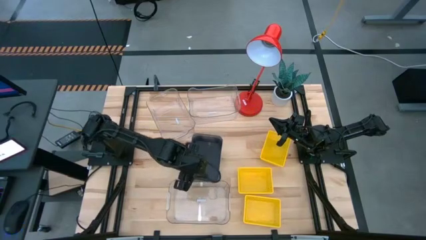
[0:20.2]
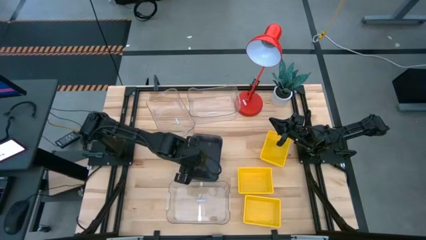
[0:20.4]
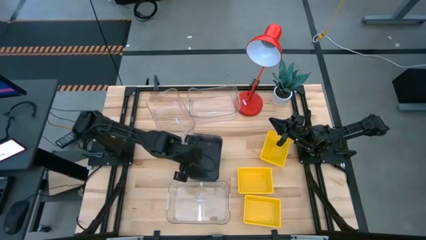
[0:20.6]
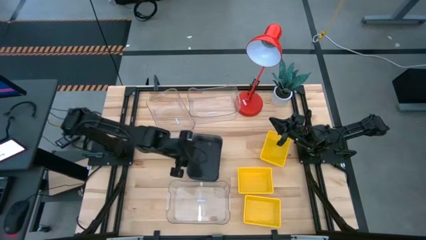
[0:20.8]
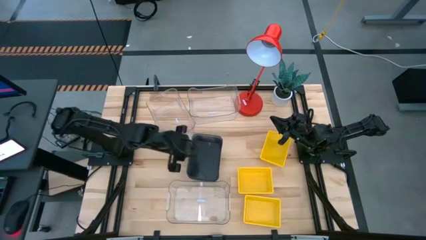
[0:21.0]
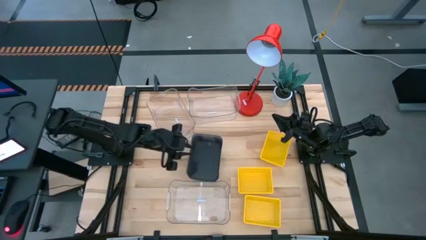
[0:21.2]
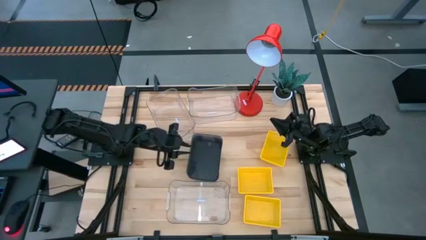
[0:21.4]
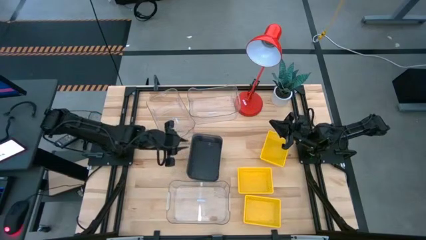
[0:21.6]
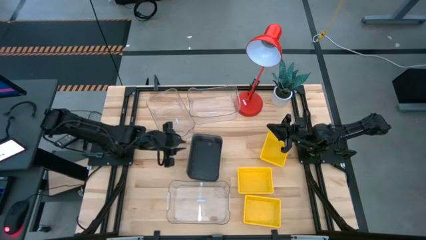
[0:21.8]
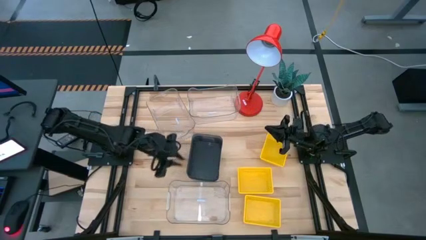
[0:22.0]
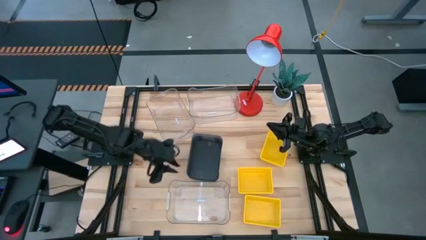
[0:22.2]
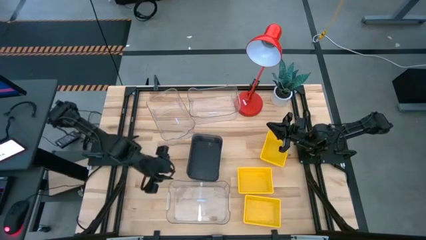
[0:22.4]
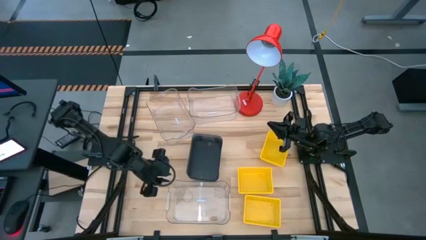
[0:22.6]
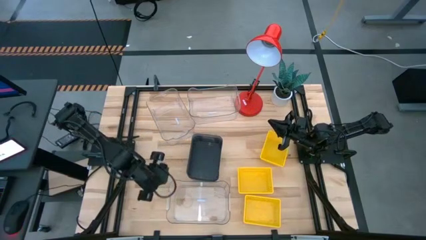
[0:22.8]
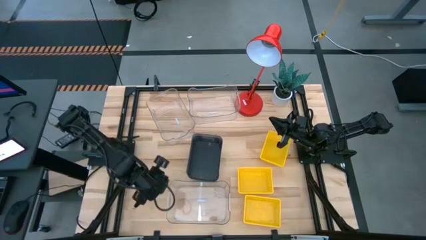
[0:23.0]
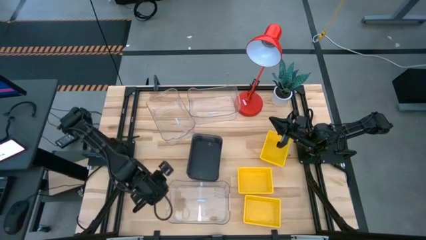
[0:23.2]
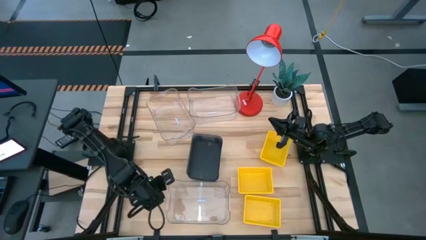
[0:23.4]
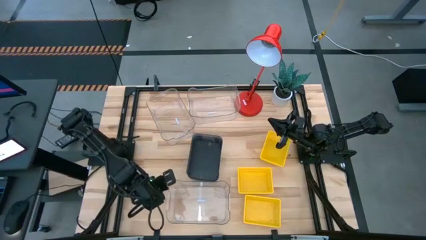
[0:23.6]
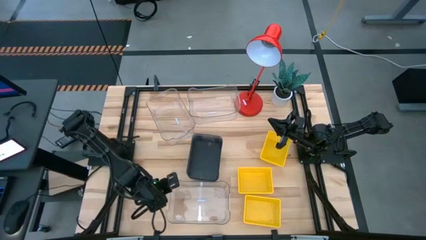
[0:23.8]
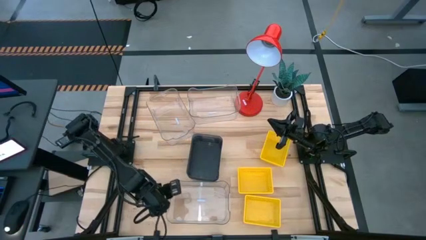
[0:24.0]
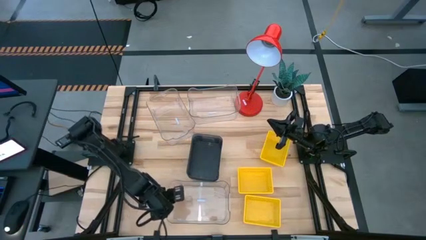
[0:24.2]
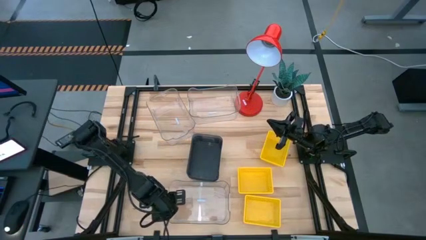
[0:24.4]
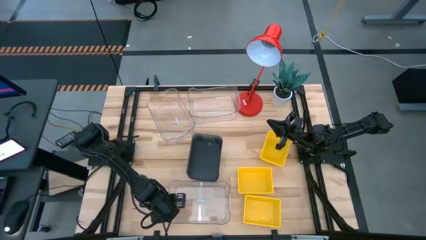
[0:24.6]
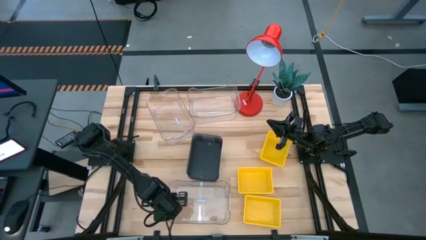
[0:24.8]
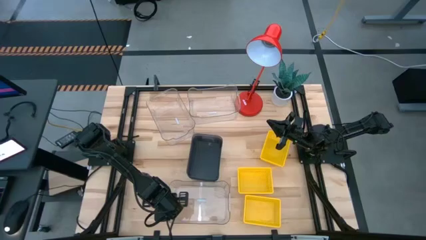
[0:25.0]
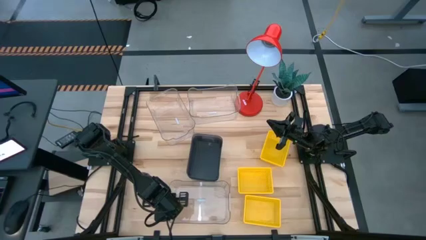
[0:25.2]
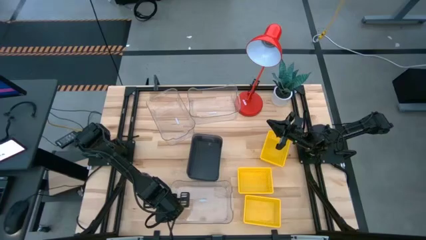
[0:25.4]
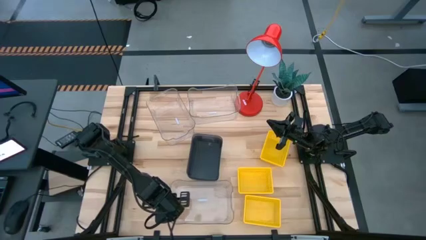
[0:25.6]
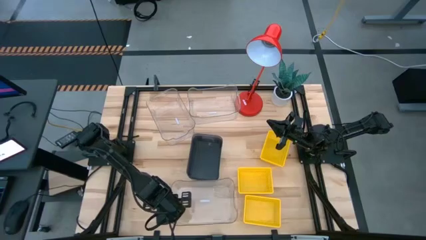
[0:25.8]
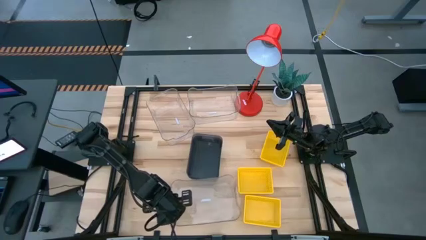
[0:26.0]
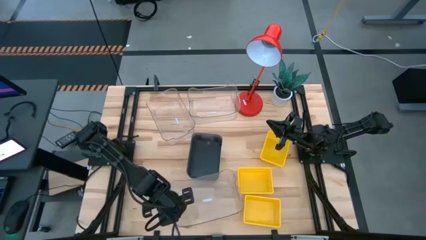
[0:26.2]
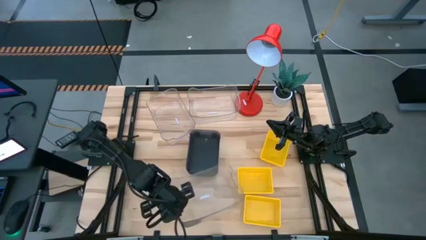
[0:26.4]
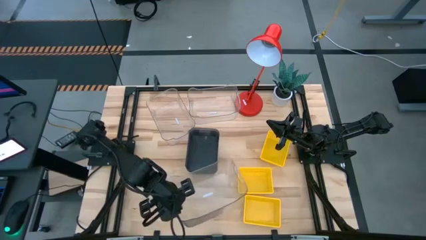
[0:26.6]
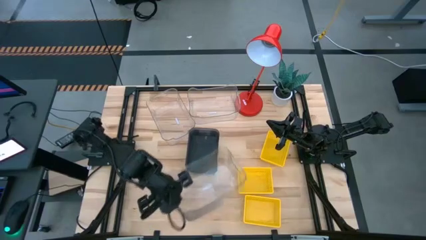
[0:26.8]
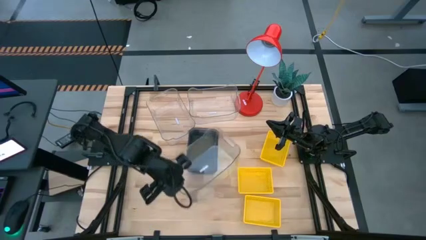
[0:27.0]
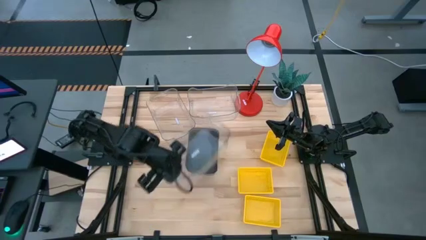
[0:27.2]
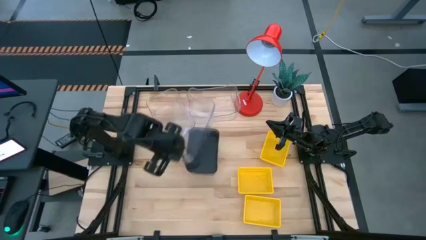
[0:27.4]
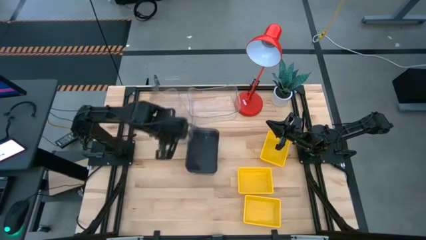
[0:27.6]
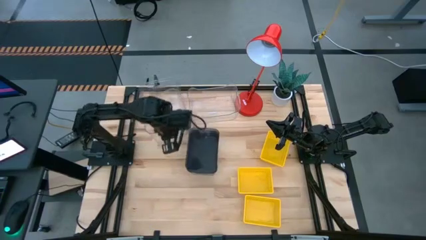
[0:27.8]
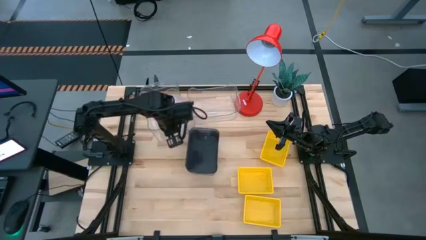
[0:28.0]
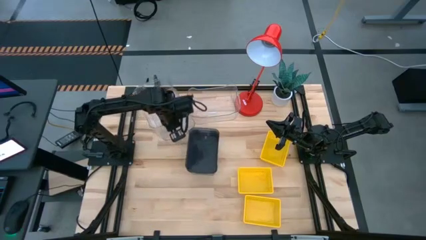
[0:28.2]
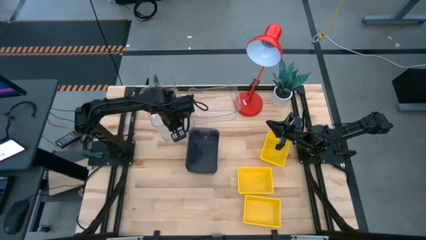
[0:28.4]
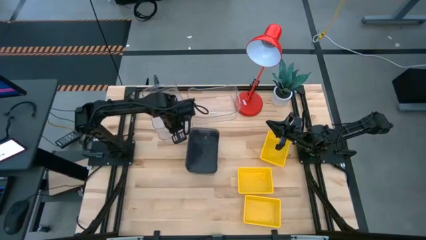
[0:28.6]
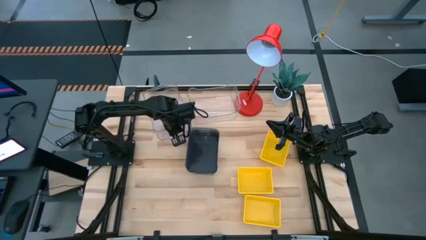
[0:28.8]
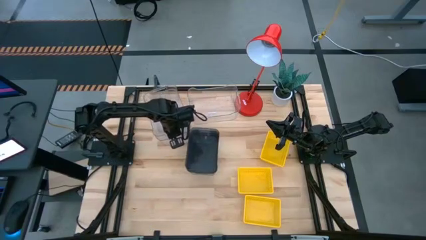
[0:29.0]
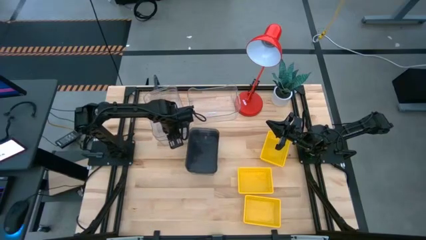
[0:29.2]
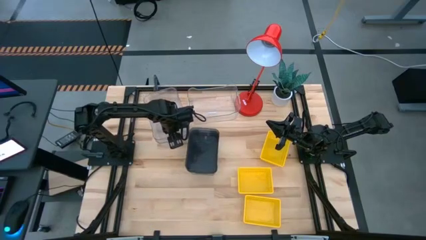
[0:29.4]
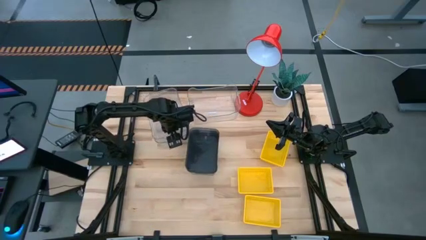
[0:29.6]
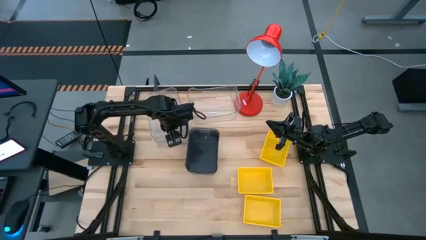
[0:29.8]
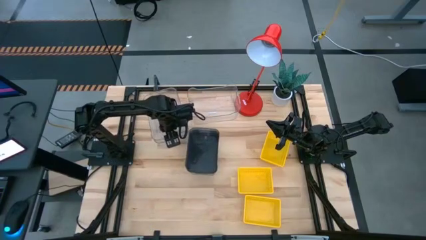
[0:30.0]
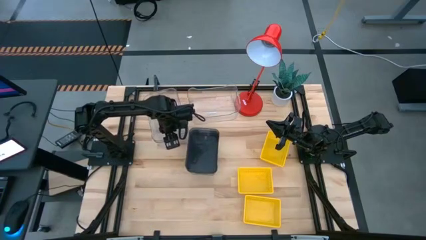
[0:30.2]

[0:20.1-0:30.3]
Stack the bottom transparent bin on the top left transparent bin

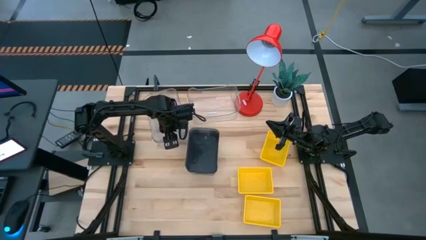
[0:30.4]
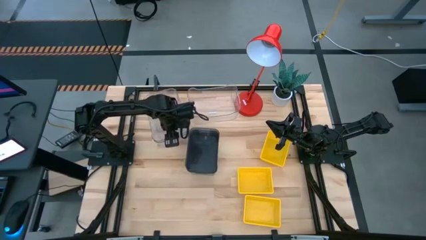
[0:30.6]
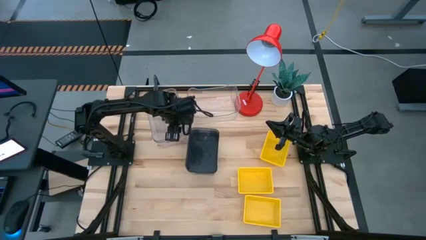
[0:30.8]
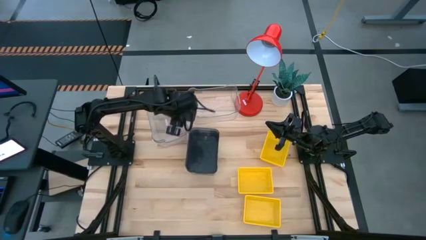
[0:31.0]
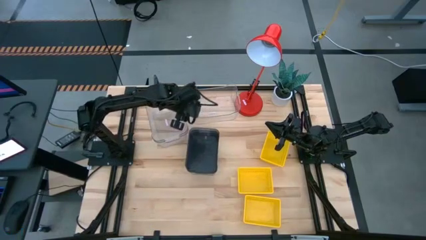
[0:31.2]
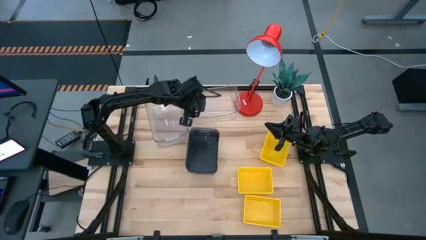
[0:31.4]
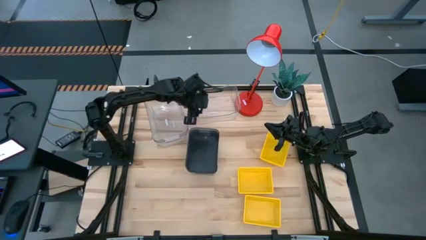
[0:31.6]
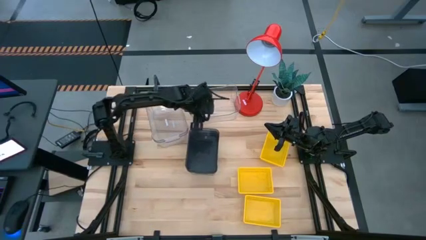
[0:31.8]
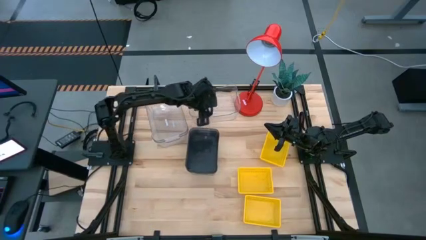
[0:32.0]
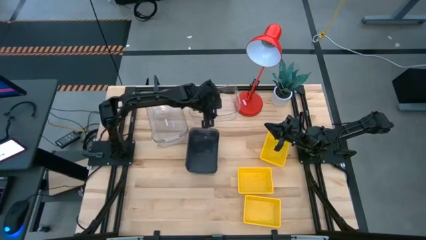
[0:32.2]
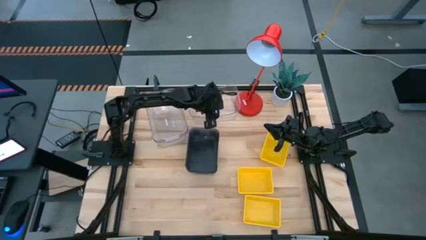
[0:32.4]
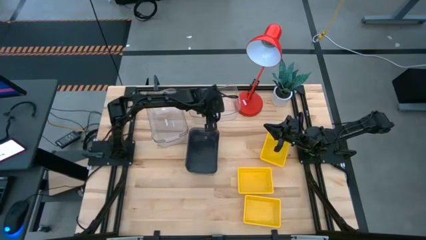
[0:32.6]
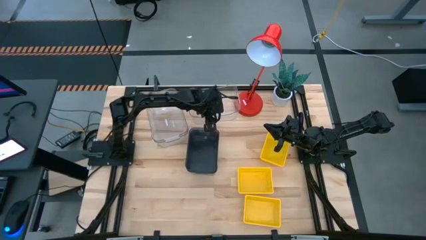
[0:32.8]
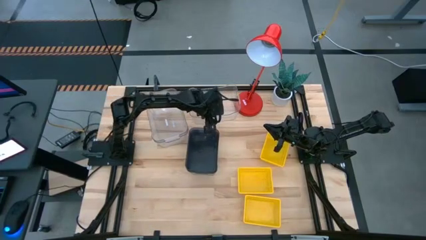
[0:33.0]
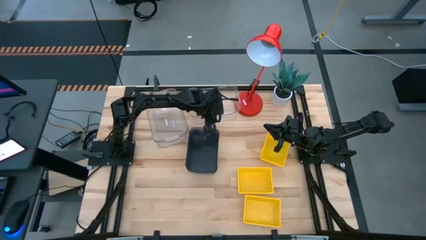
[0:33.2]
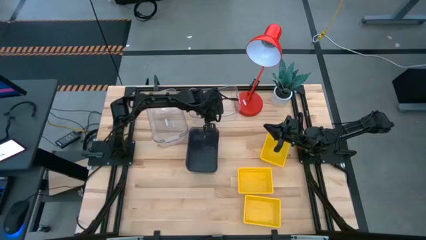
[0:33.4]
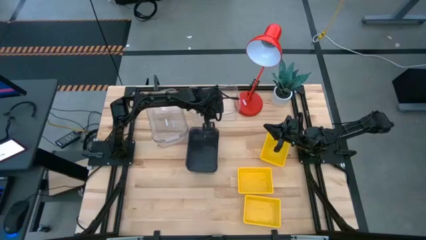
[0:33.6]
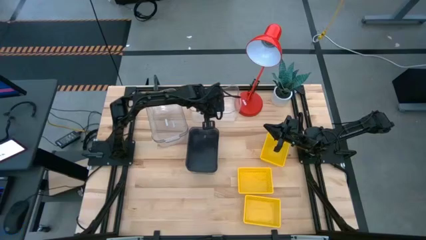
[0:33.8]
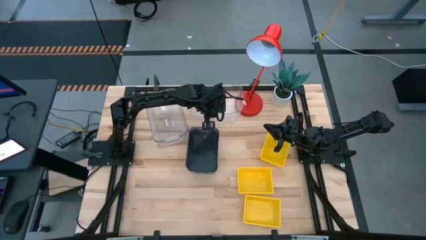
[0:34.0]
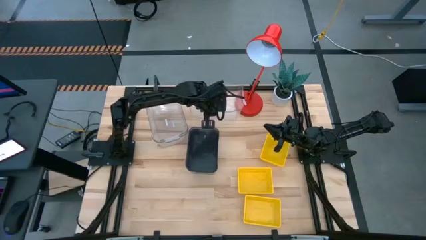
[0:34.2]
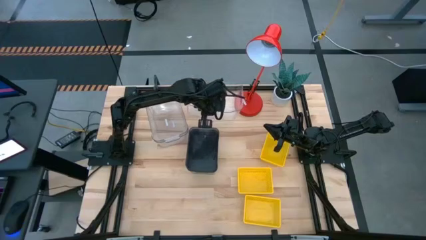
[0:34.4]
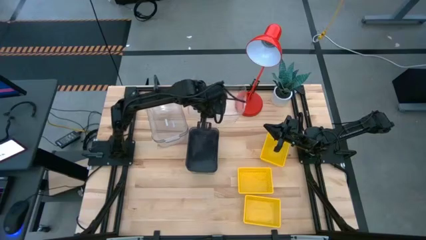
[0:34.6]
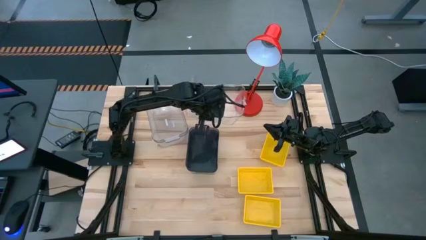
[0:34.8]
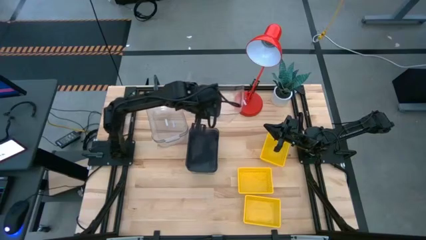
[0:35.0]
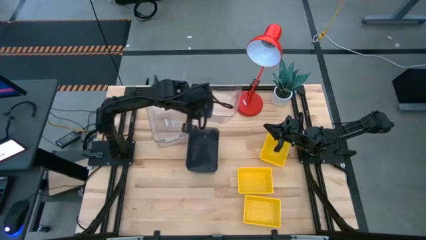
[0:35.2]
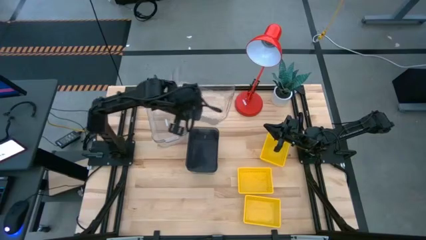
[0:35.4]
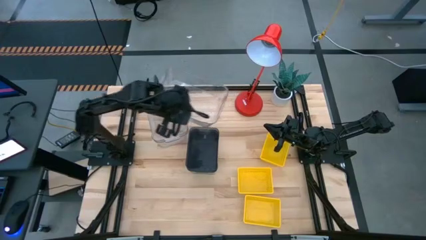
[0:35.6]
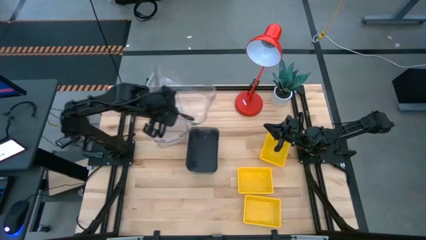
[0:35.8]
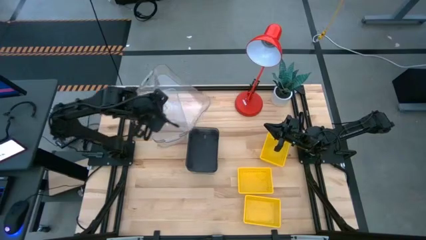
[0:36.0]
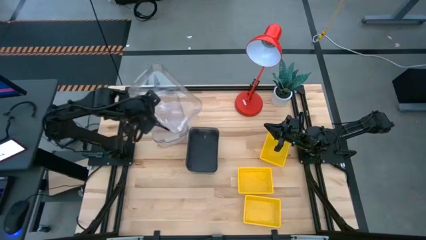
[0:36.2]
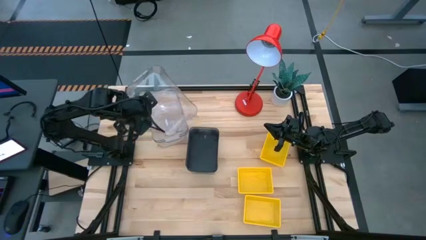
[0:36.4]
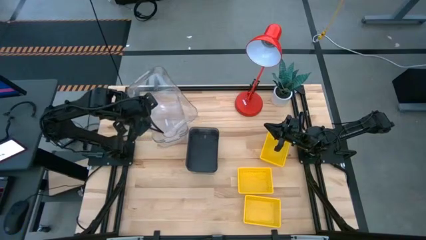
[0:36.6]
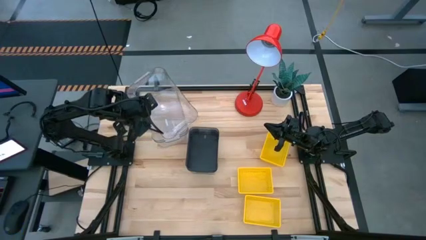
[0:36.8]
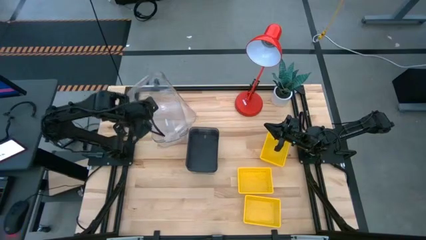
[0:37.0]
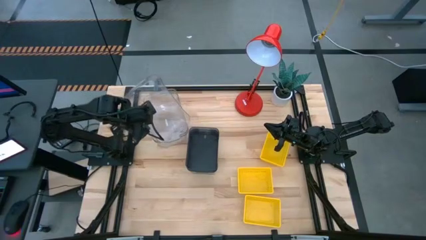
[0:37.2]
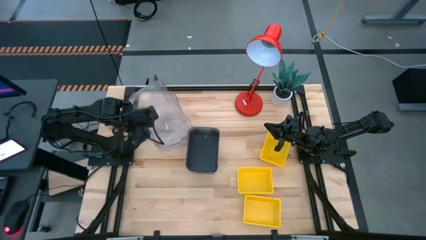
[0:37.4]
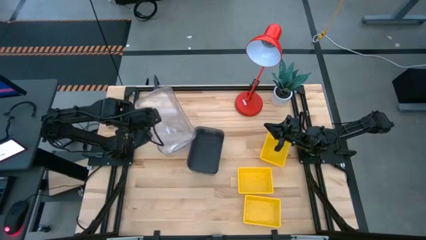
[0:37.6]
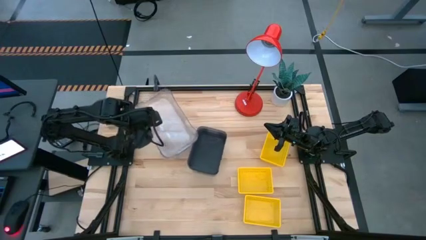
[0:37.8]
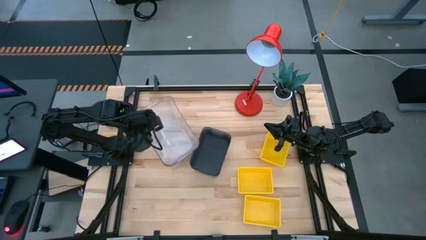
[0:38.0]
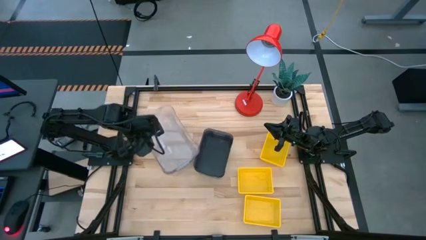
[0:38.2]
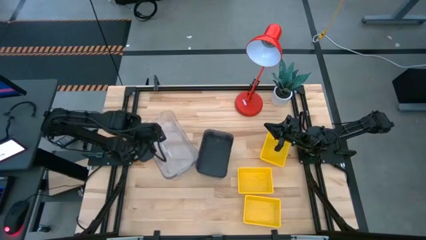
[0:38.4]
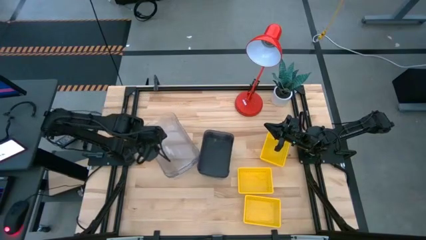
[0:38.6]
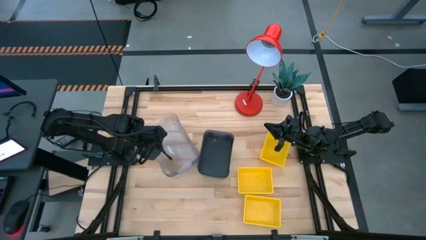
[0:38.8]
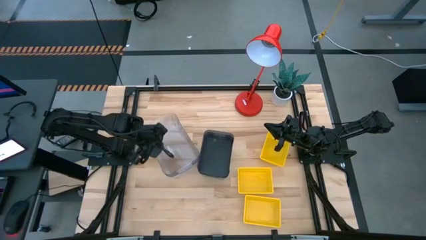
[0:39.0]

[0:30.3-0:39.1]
Stack the right transparent bin on the transparent bins
